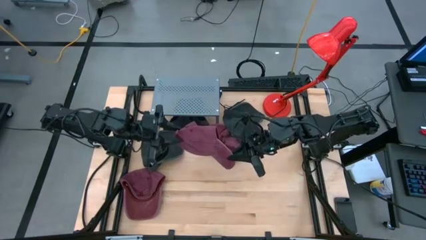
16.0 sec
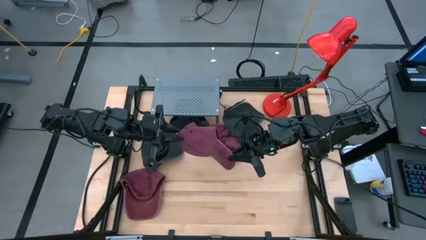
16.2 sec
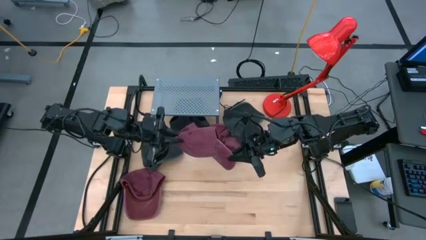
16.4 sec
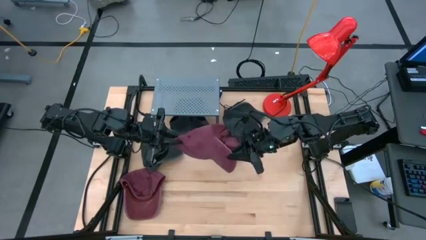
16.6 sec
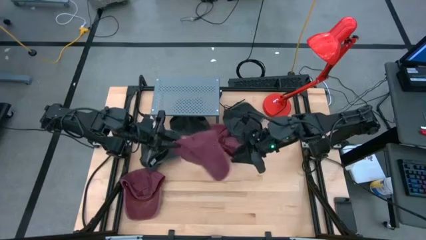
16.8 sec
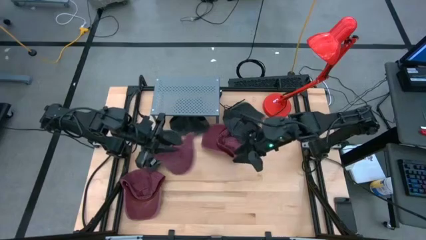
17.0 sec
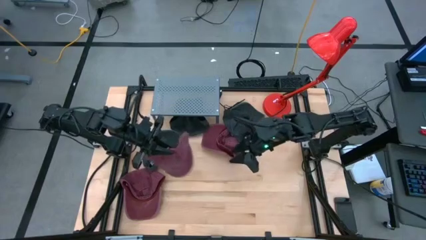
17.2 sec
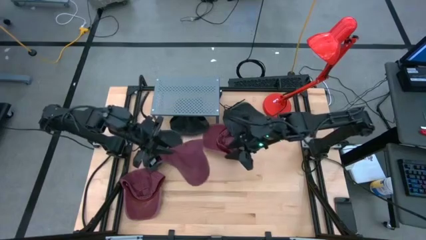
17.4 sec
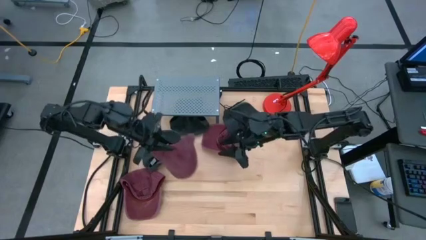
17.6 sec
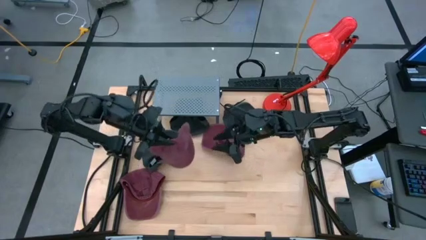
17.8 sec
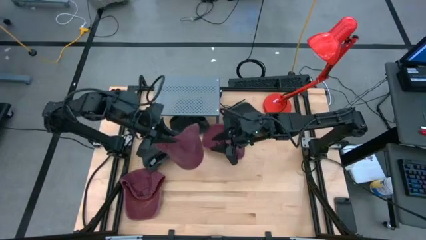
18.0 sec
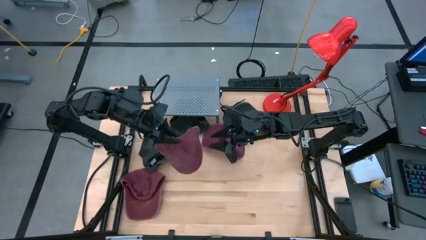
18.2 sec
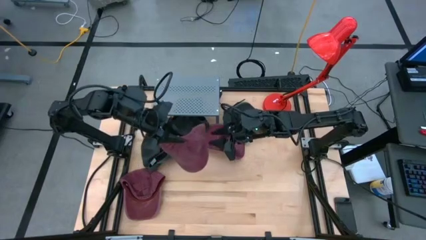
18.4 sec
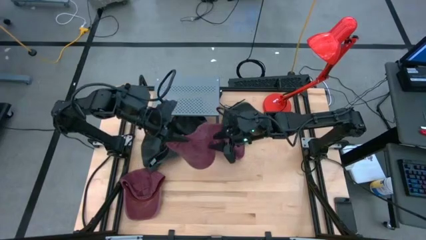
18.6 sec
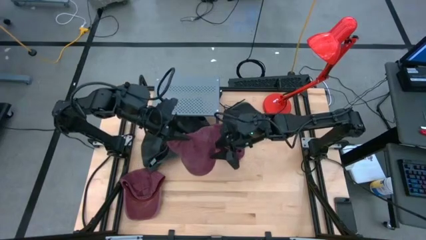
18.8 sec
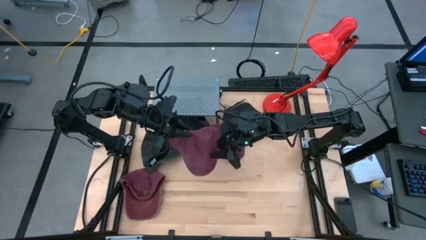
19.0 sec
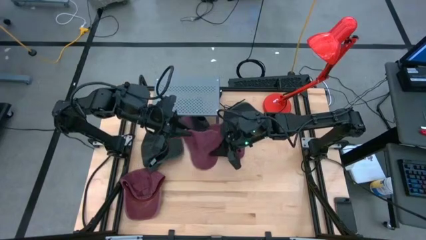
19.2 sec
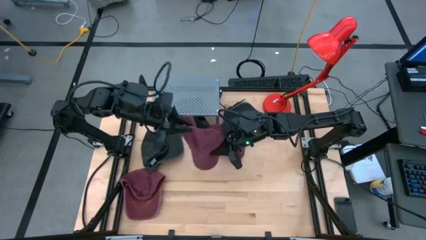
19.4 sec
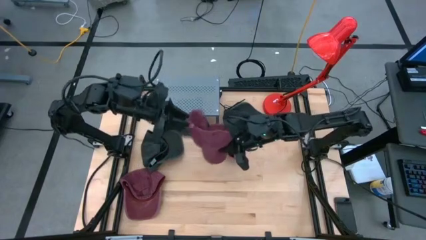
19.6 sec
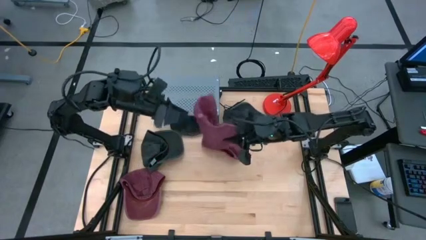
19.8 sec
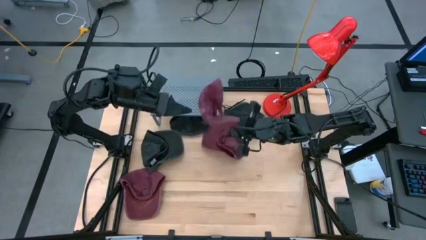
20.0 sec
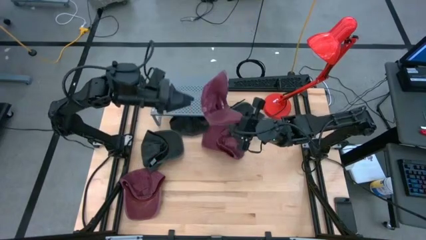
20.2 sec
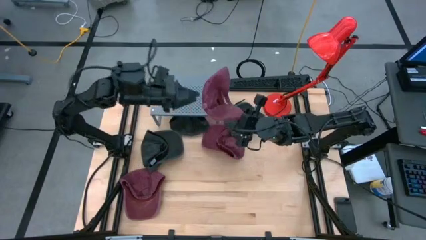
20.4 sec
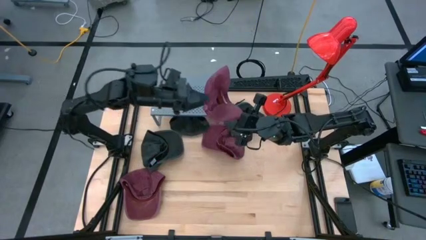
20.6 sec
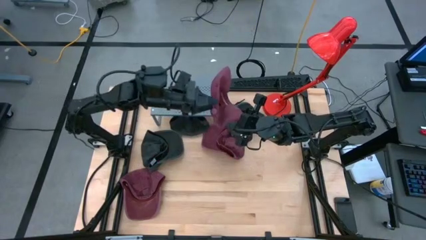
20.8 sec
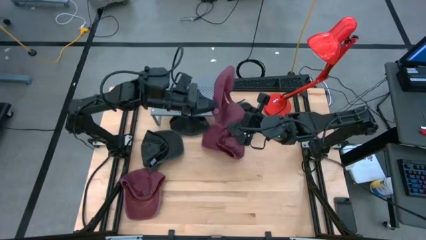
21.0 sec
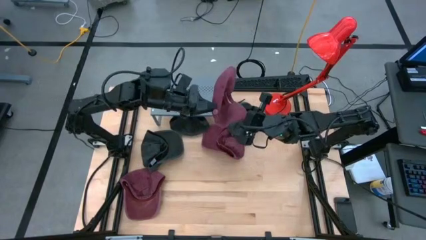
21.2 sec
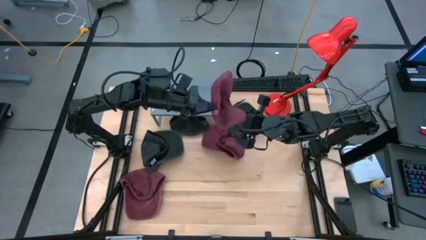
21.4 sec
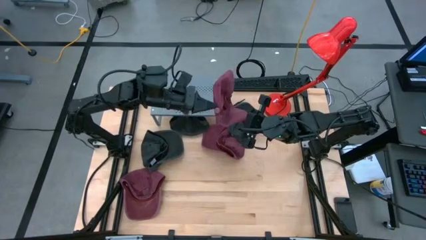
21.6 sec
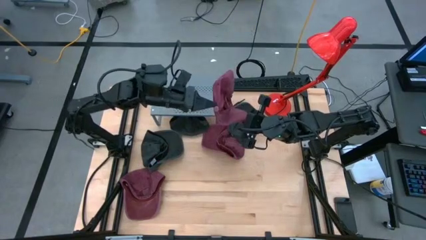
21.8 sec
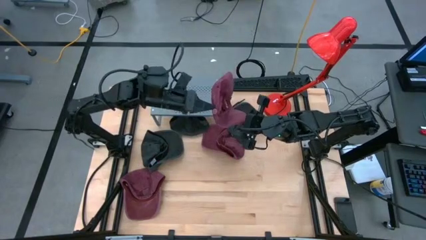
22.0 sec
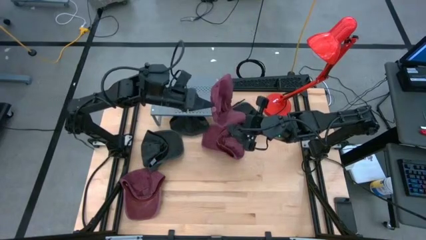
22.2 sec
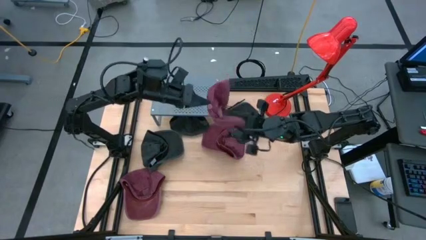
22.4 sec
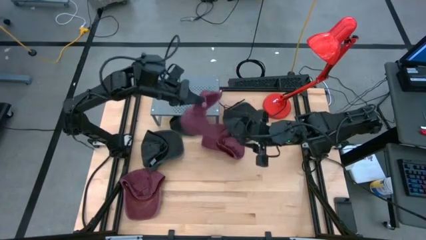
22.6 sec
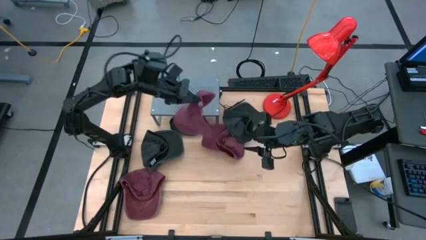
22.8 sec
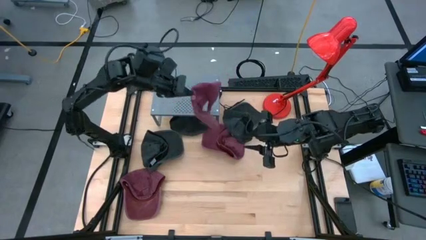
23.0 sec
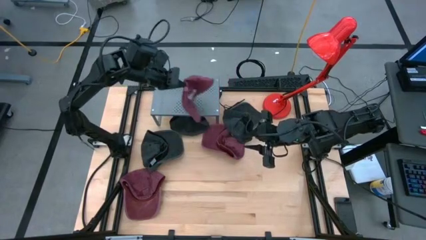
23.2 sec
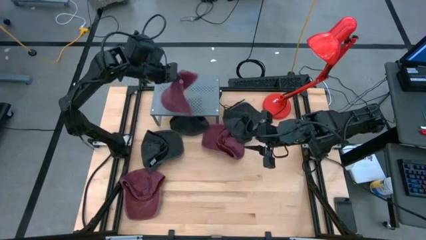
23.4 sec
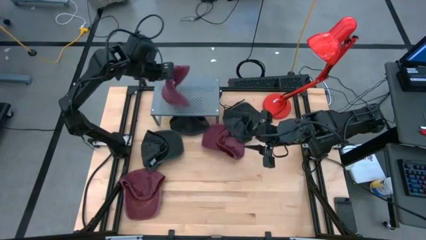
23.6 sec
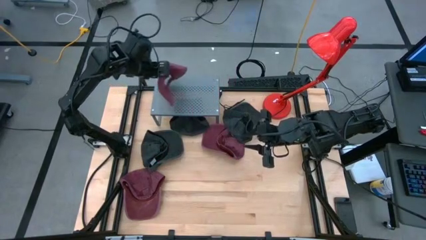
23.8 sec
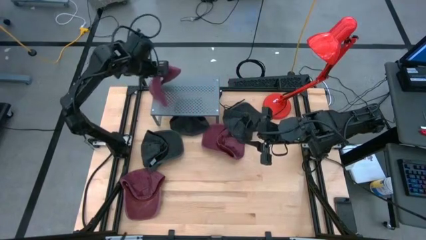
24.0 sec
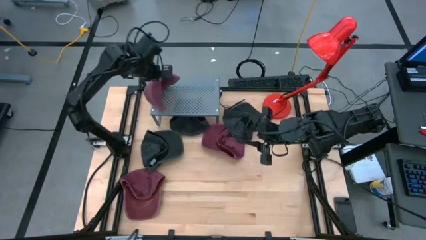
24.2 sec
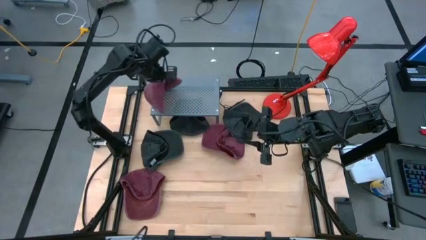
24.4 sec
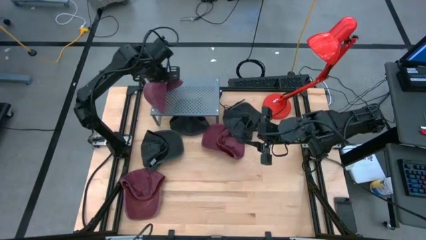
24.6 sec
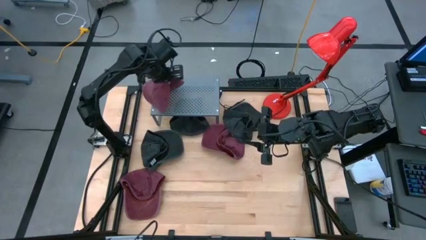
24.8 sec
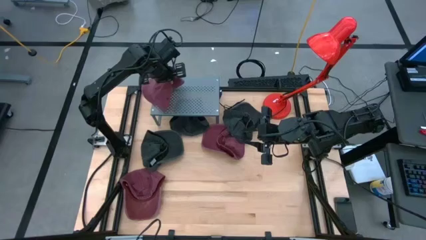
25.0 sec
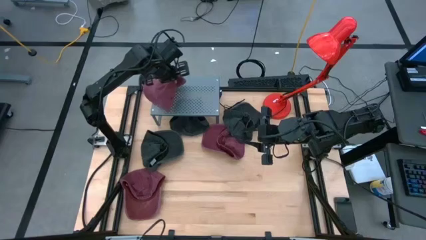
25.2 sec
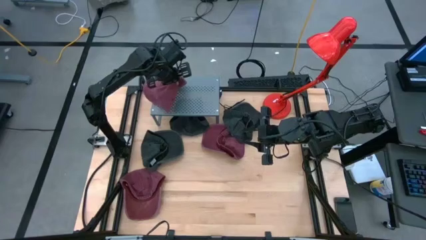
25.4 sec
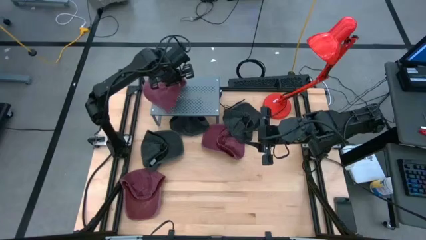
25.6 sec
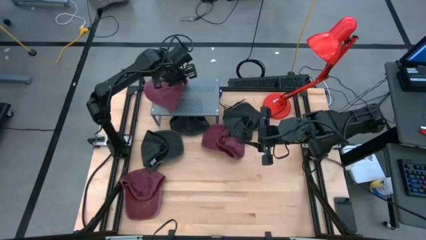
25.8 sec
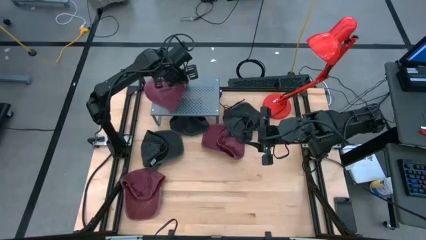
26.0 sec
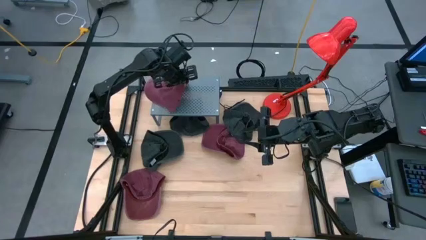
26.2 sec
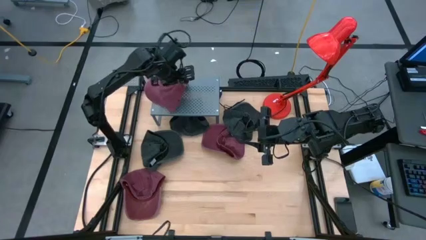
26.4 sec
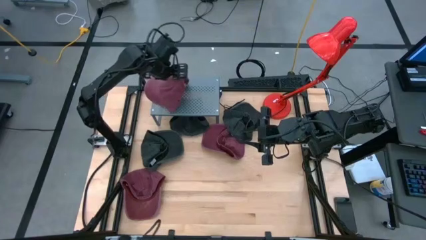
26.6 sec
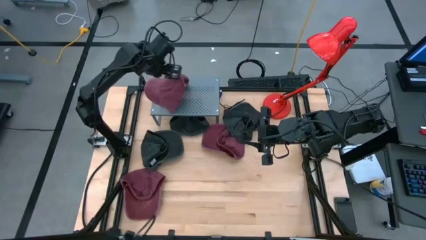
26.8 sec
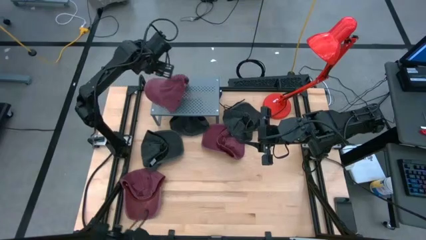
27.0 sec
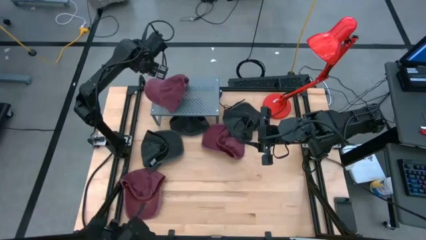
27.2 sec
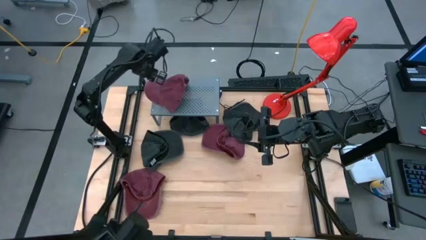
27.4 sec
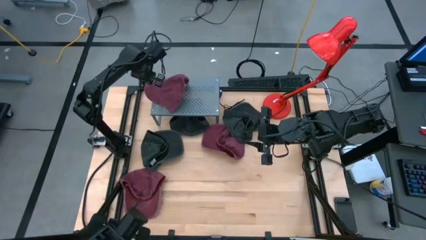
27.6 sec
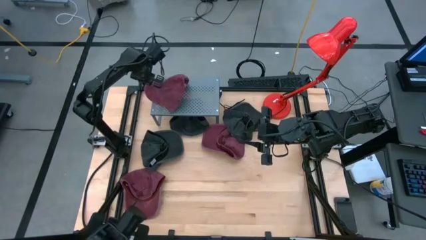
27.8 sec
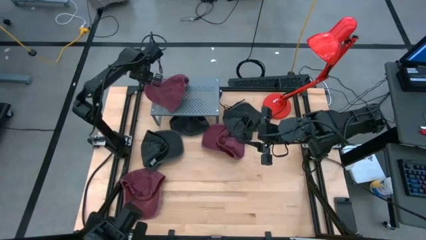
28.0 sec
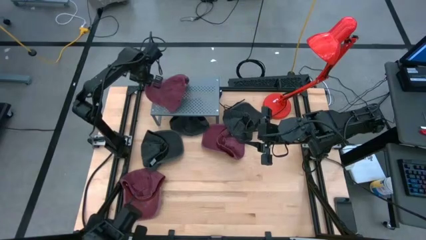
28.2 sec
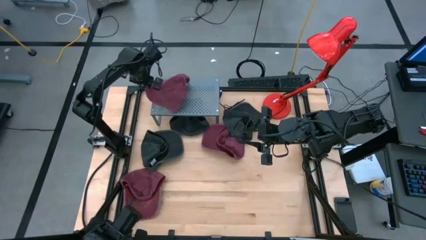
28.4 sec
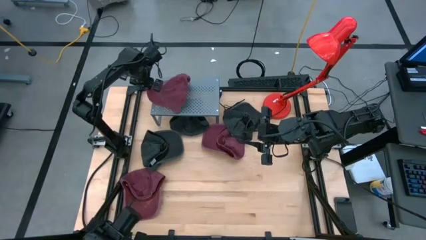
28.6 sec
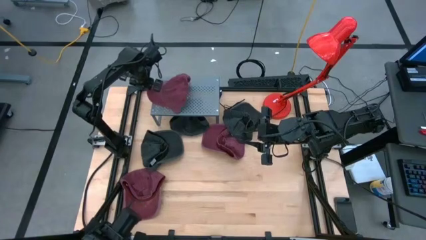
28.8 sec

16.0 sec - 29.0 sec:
Task: Pick & Place hat
Put the top right red cap on the shelf
